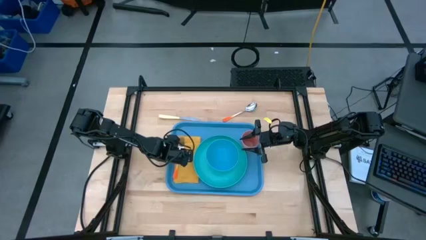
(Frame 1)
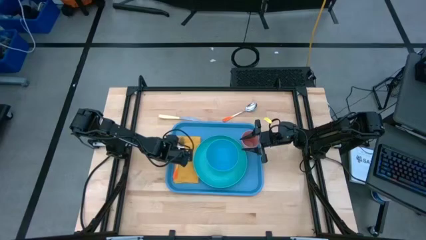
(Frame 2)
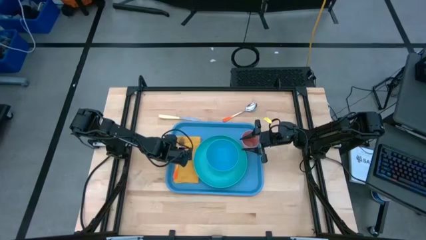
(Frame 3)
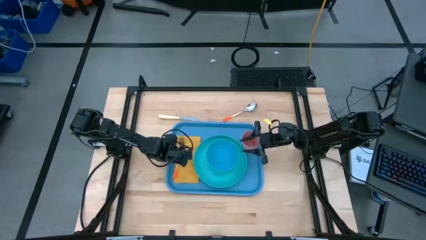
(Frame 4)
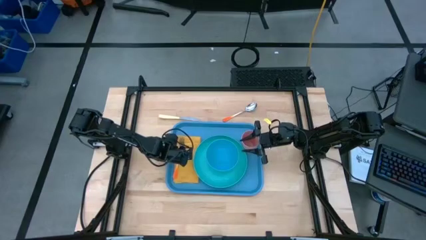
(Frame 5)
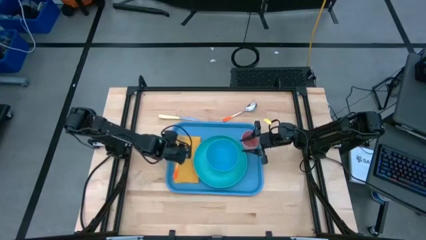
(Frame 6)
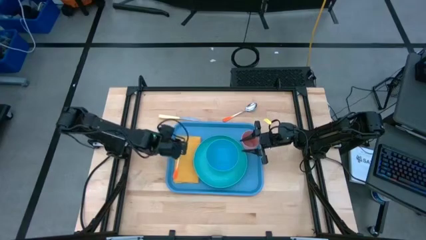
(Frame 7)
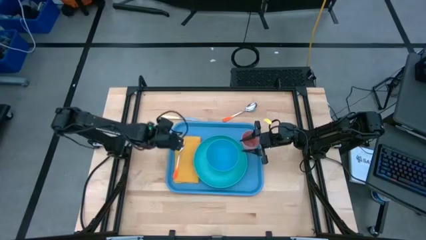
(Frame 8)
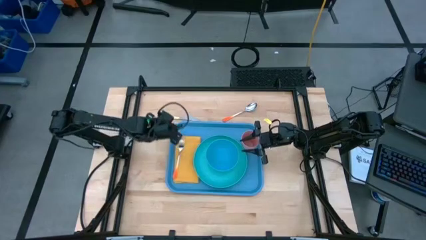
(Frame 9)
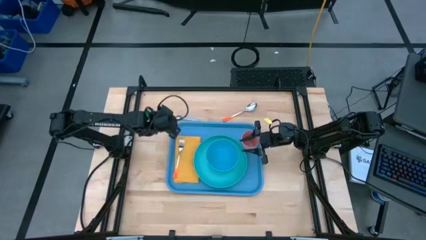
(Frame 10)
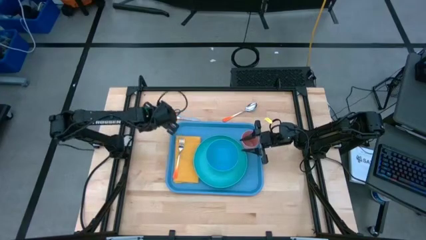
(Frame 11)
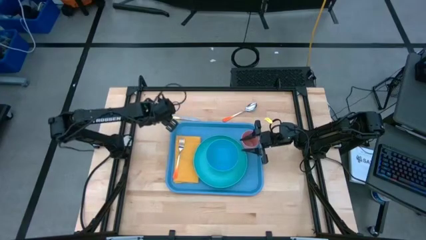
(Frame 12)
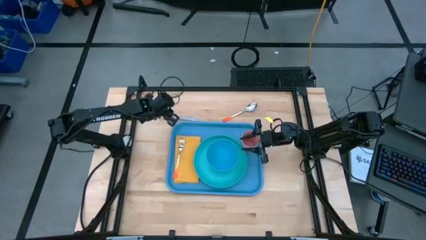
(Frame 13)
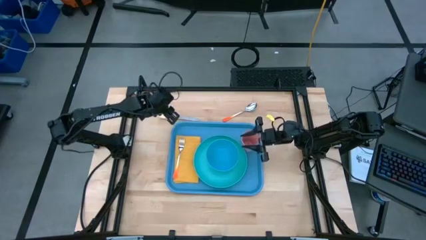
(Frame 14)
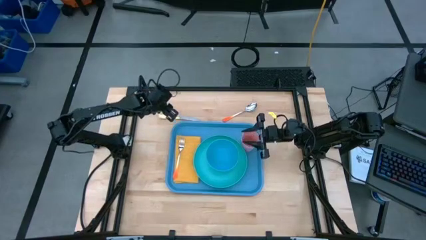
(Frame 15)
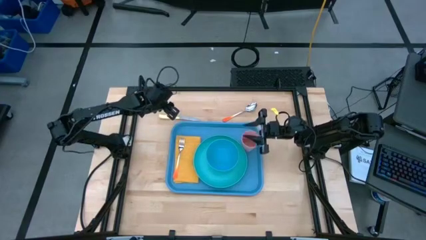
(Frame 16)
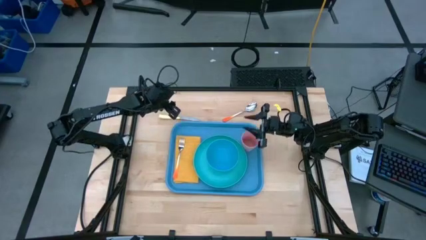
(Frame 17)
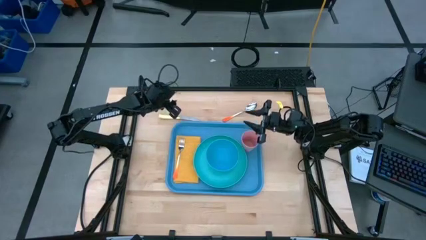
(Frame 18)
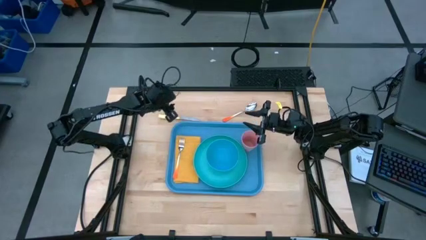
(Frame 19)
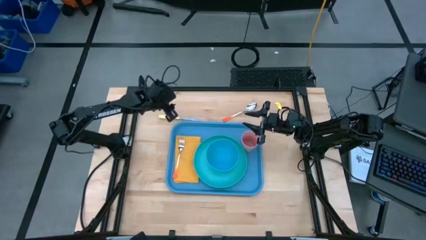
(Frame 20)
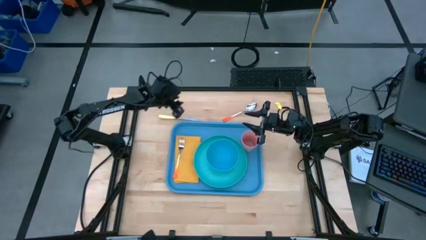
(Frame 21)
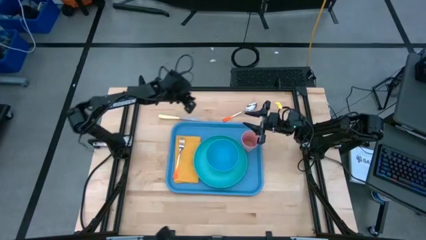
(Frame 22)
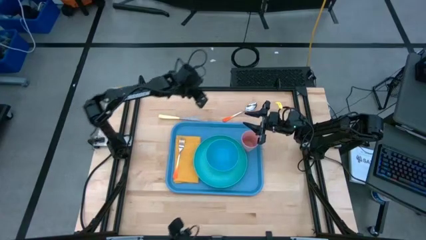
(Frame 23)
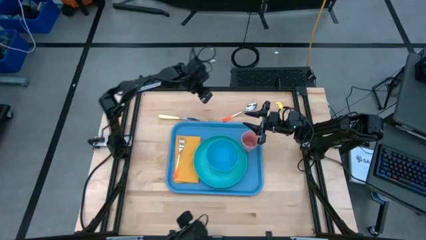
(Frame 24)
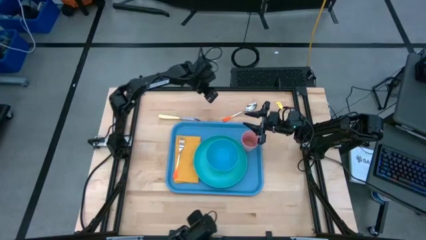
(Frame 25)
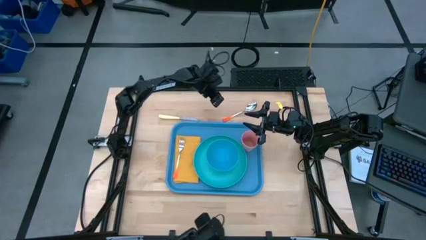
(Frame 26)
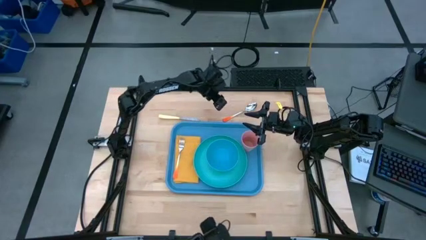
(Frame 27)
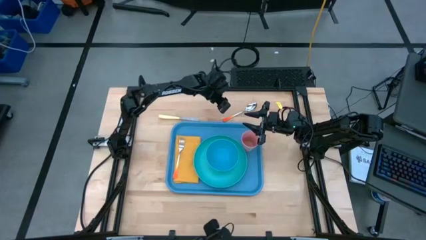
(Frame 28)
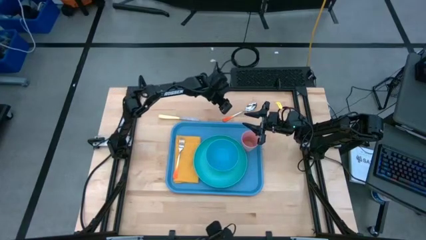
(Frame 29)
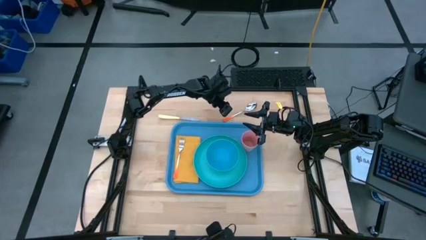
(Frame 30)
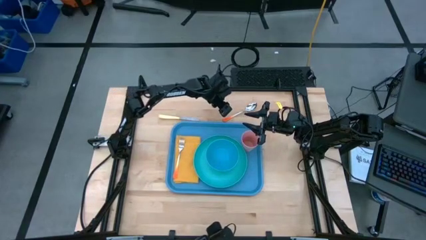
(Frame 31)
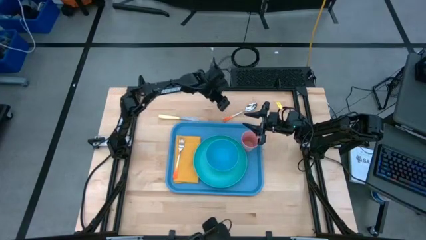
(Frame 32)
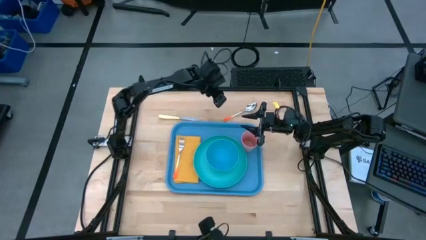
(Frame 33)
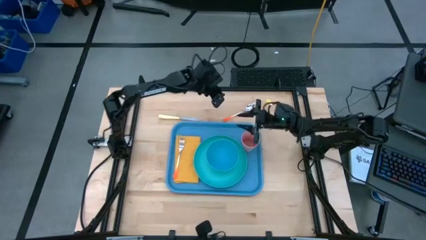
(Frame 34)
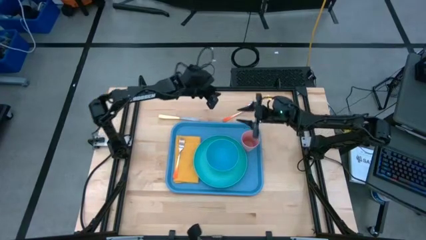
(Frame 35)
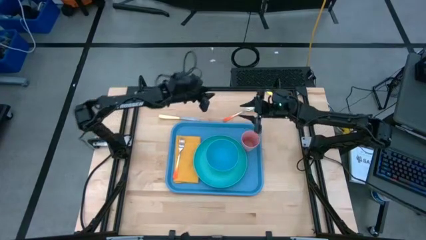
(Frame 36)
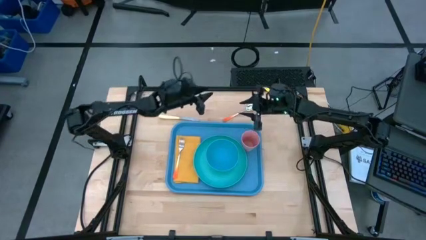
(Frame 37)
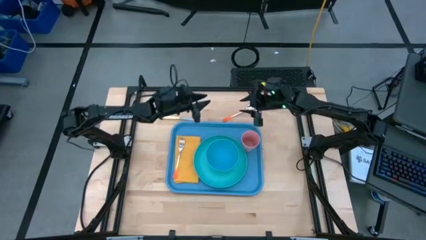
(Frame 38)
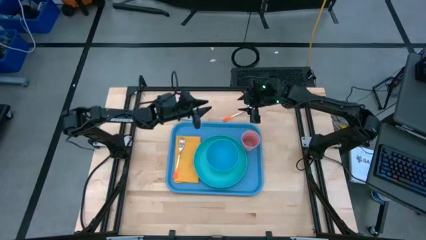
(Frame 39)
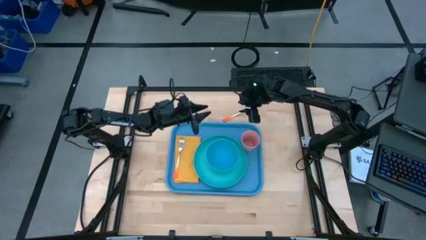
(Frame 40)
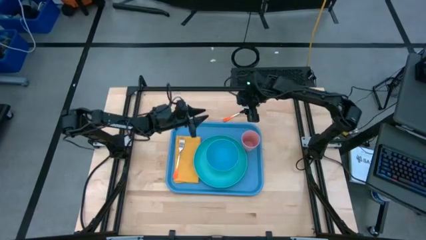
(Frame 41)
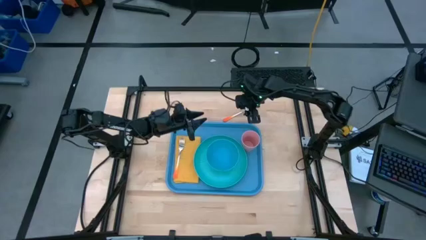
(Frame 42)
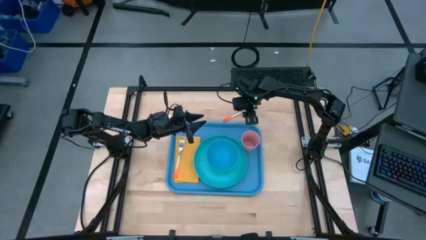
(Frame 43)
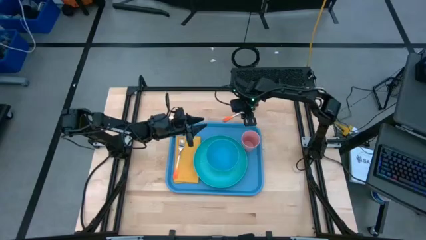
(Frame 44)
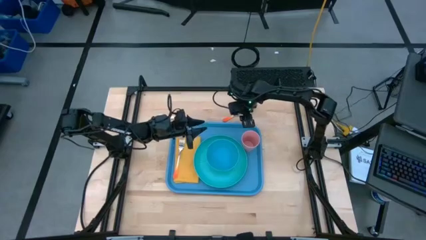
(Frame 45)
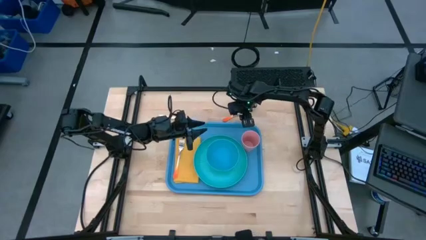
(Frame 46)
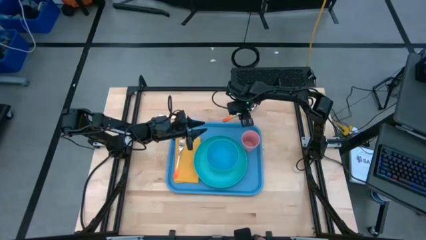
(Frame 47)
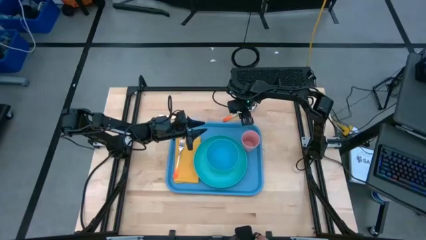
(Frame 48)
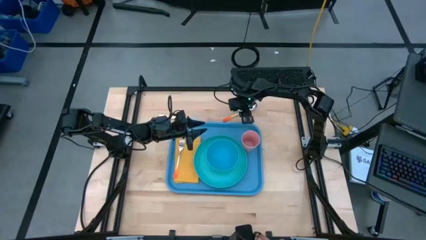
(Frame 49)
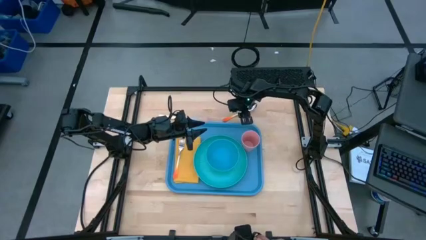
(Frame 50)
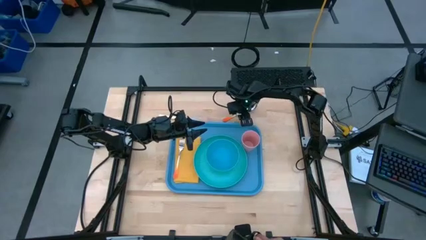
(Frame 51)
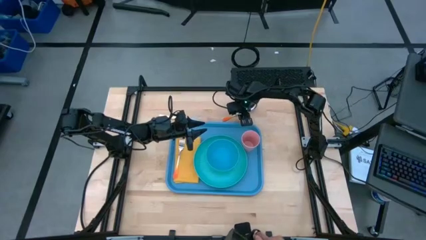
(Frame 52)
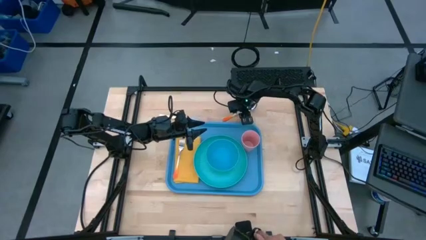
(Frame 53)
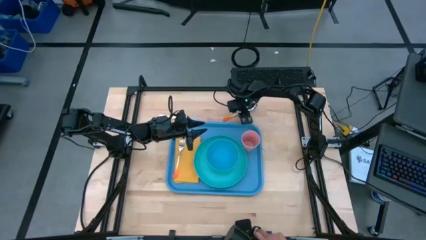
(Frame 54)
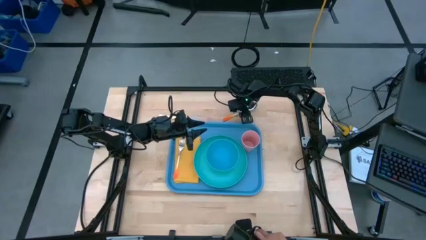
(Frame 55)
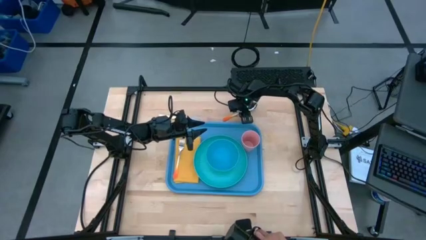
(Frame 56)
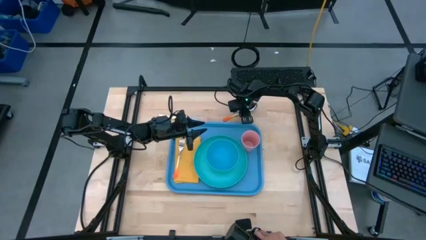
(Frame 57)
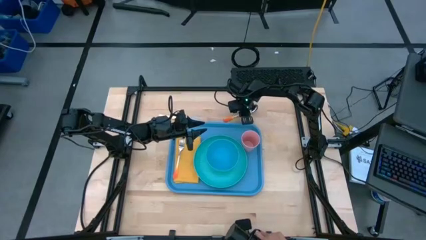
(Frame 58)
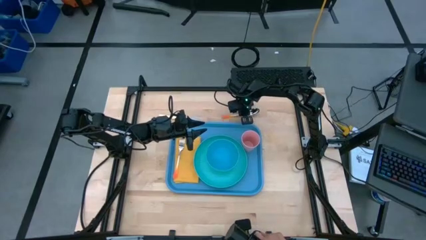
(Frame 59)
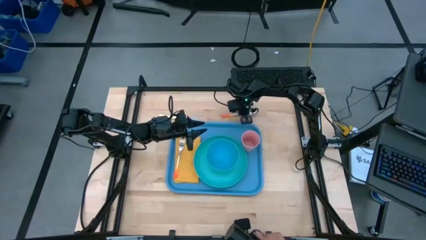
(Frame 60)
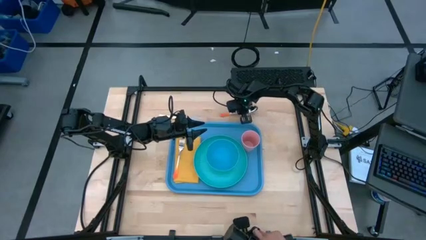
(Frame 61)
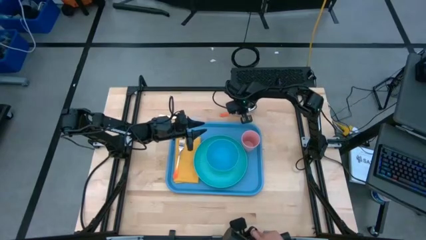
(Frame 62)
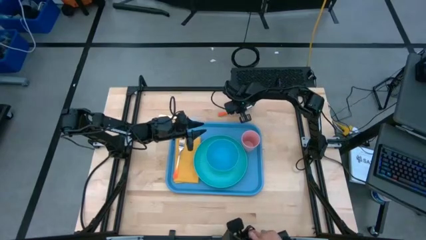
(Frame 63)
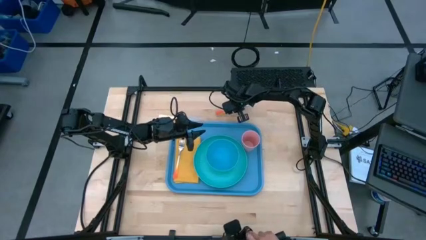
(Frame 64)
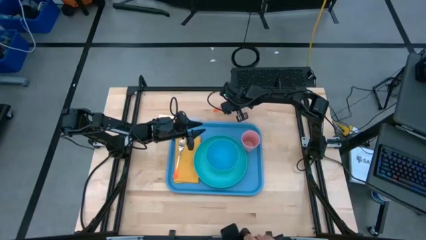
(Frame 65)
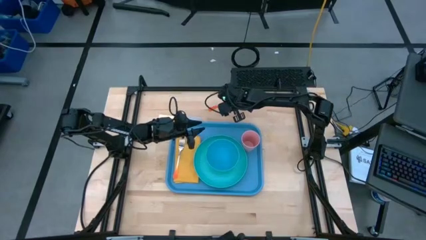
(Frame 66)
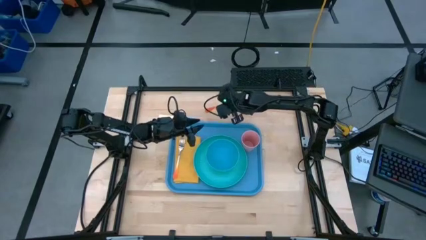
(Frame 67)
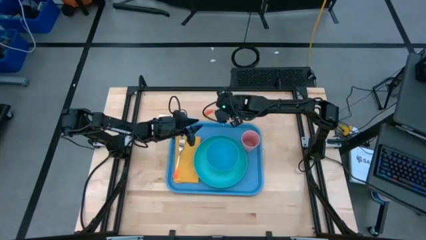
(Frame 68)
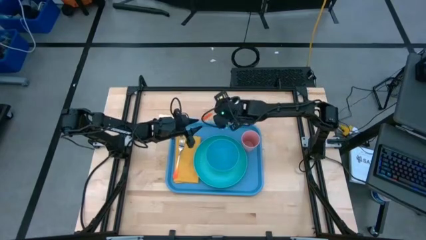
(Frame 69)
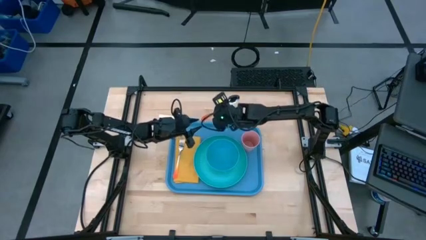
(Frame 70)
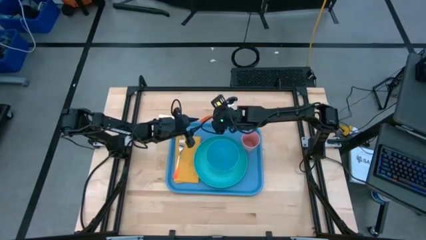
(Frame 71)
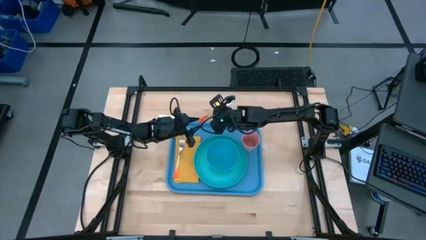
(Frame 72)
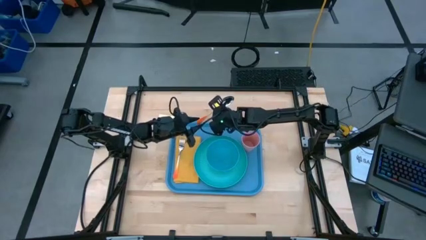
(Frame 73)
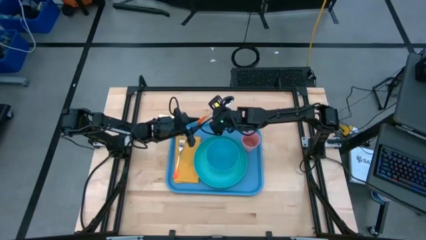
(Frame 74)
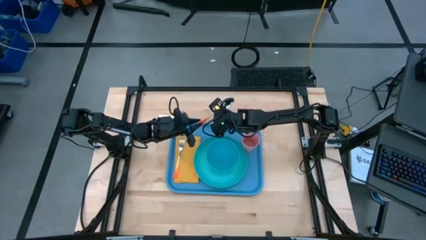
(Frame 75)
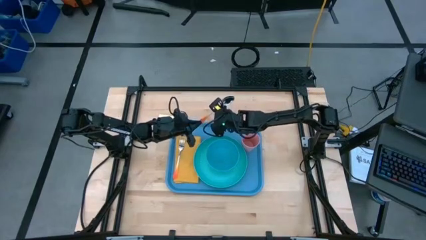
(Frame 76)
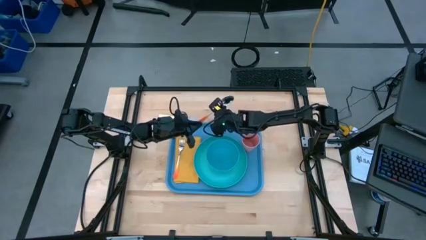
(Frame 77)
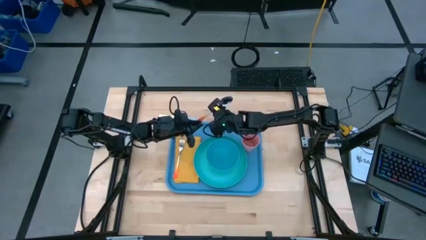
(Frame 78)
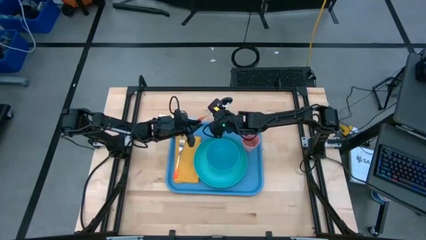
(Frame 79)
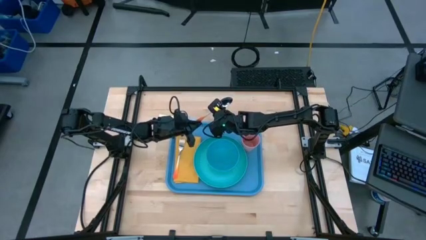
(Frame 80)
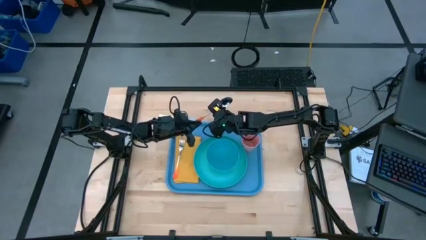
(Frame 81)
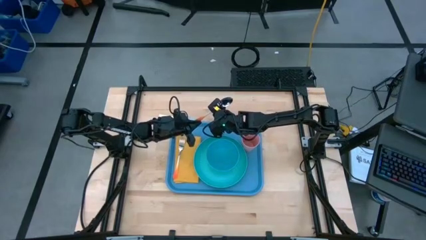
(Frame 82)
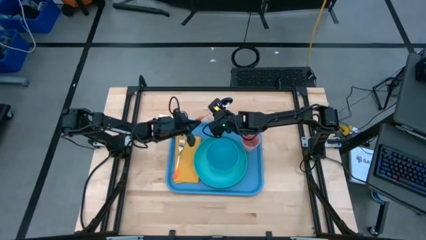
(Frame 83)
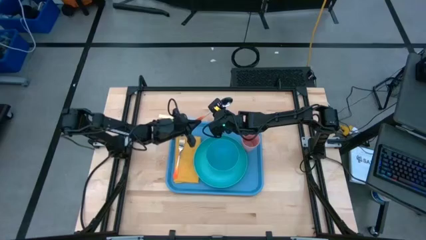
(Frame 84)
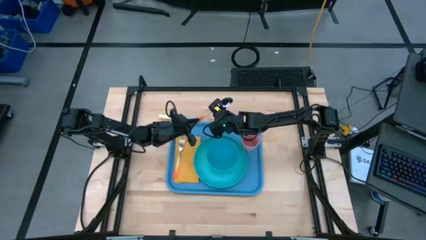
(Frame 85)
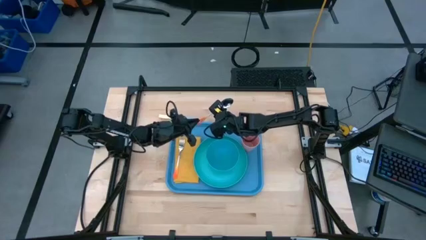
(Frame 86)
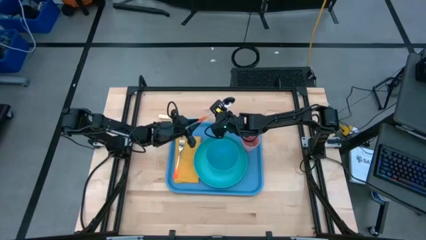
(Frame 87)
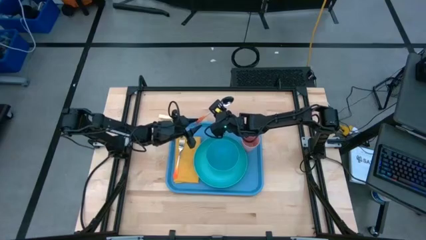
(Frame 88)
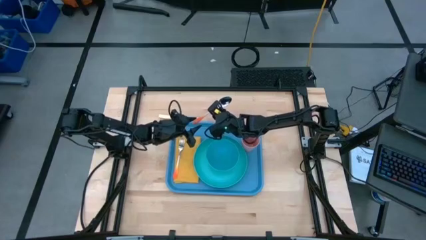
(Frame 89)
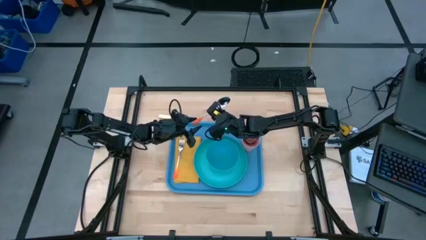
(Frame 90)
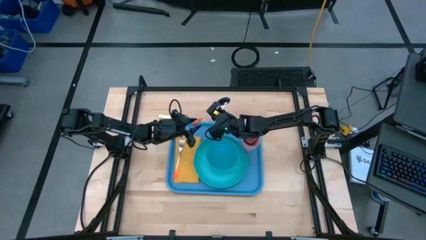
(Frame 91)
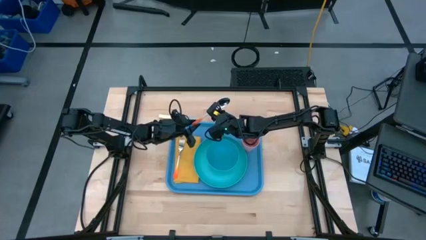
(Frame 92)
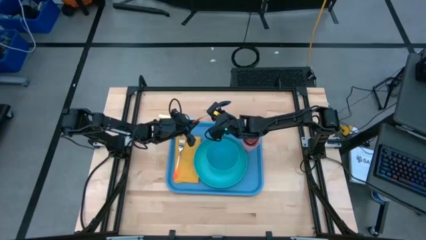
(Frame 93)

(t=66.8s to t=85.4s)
Task: Set up tray
Put the orange spoon on the yellow napkin
